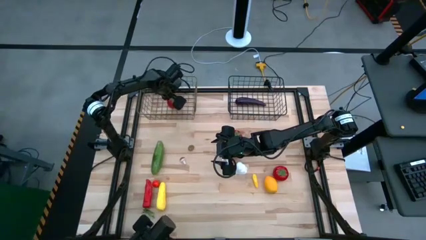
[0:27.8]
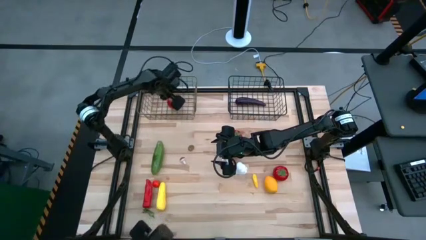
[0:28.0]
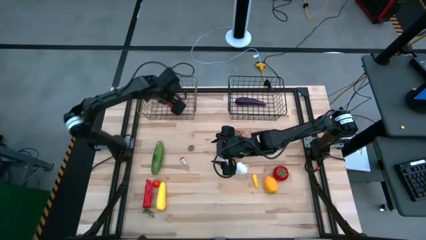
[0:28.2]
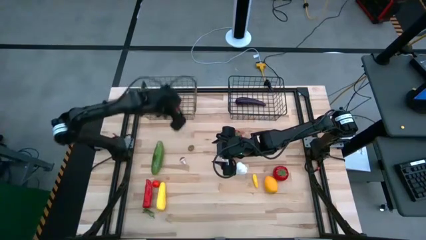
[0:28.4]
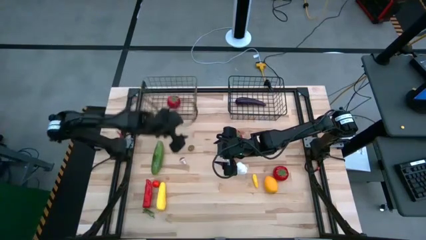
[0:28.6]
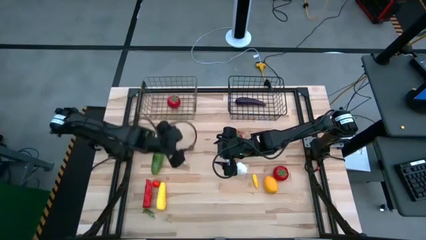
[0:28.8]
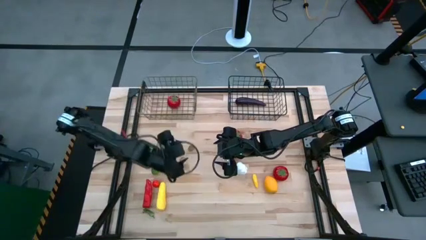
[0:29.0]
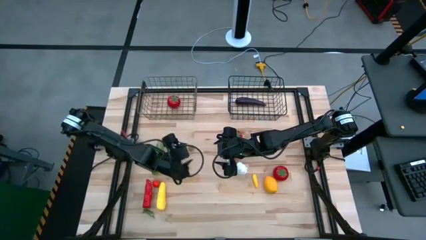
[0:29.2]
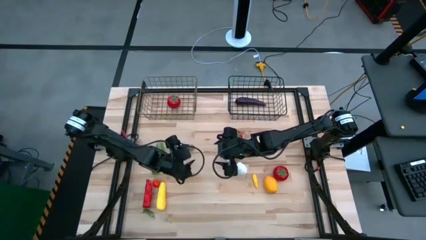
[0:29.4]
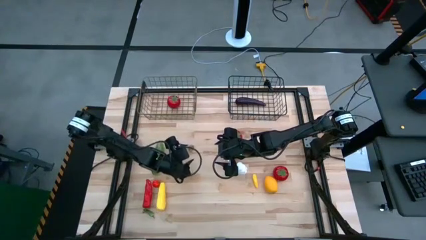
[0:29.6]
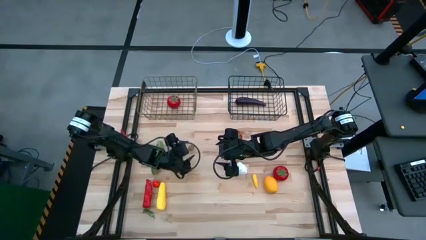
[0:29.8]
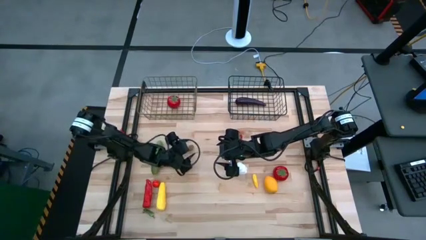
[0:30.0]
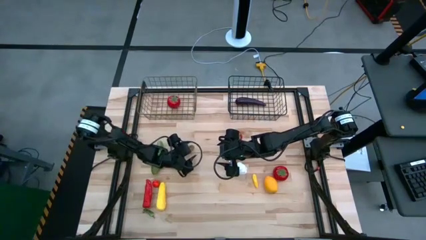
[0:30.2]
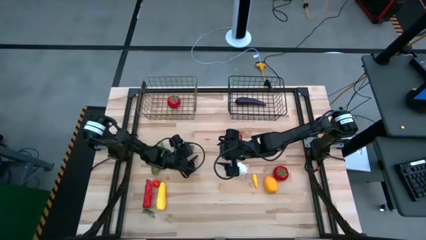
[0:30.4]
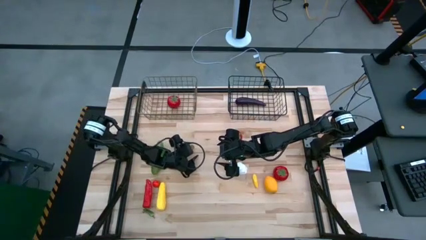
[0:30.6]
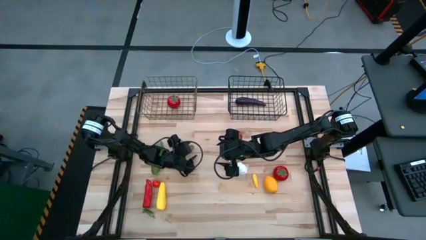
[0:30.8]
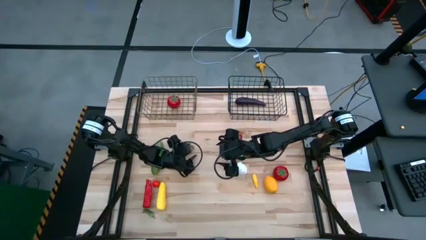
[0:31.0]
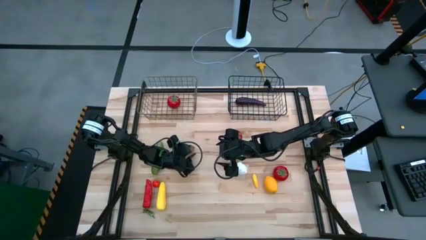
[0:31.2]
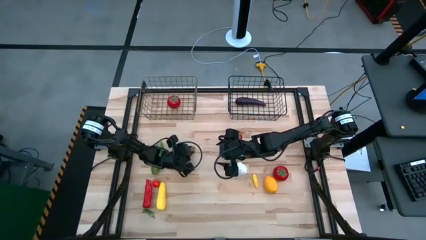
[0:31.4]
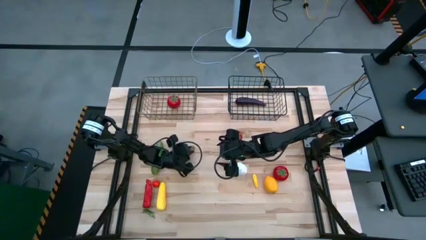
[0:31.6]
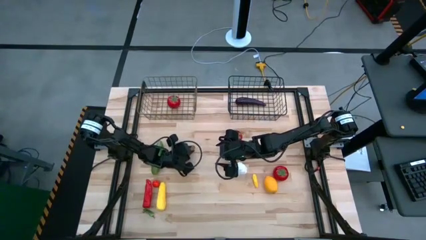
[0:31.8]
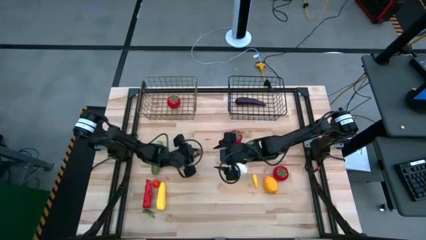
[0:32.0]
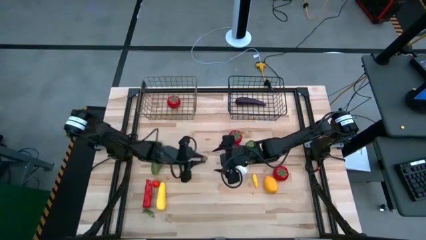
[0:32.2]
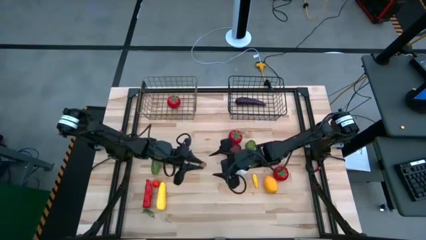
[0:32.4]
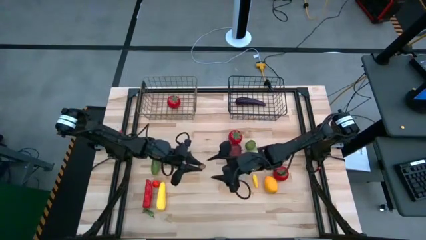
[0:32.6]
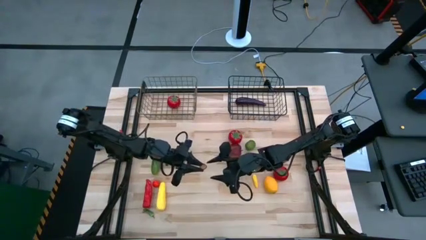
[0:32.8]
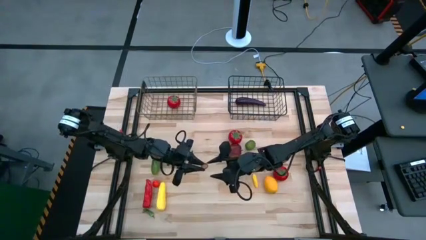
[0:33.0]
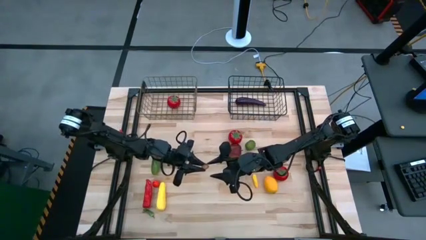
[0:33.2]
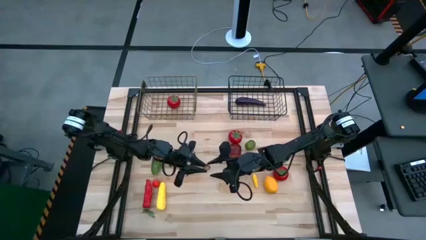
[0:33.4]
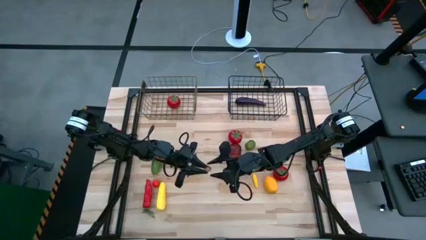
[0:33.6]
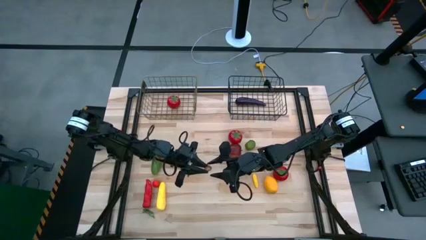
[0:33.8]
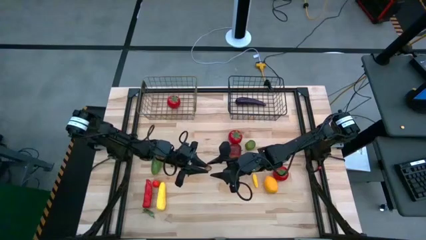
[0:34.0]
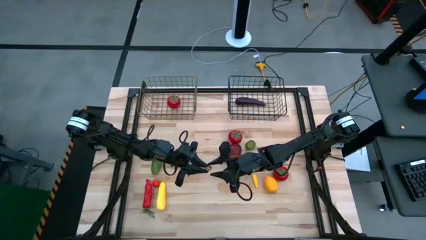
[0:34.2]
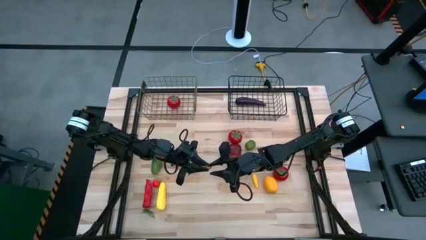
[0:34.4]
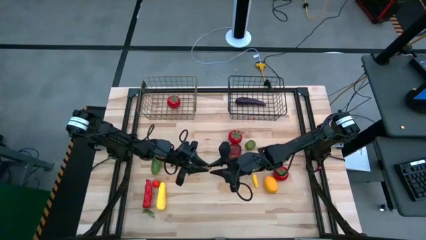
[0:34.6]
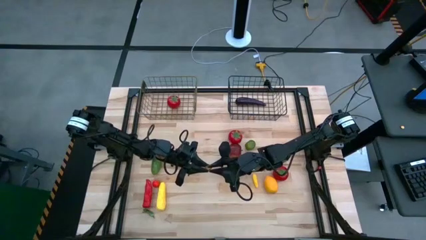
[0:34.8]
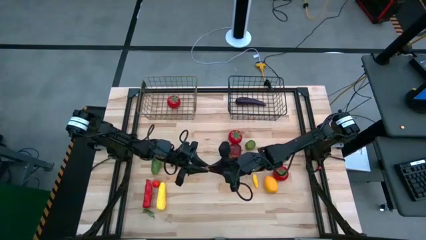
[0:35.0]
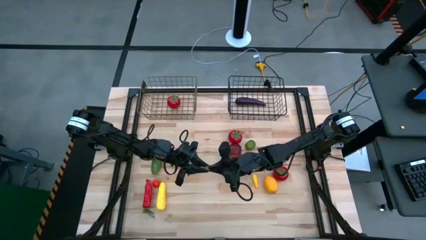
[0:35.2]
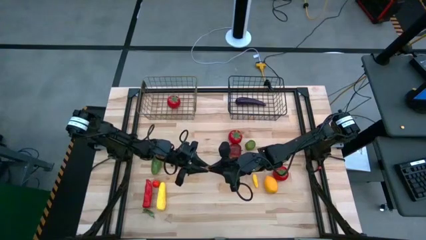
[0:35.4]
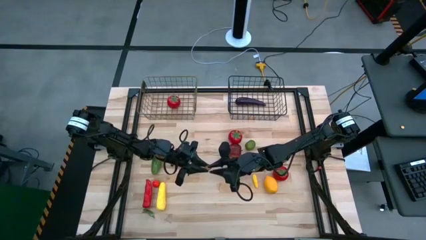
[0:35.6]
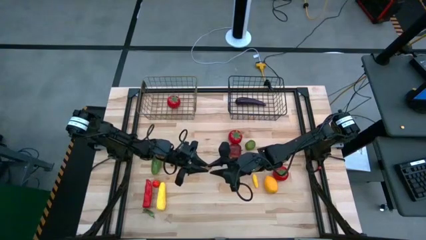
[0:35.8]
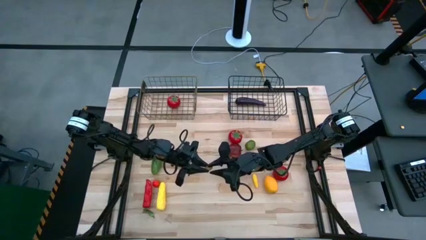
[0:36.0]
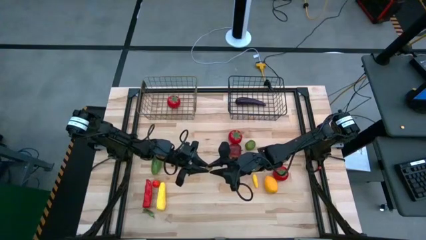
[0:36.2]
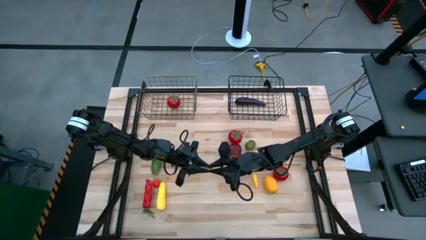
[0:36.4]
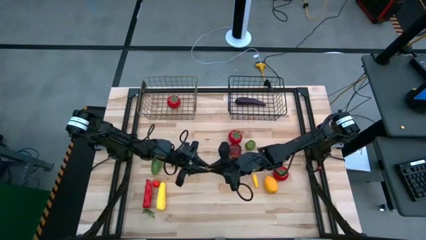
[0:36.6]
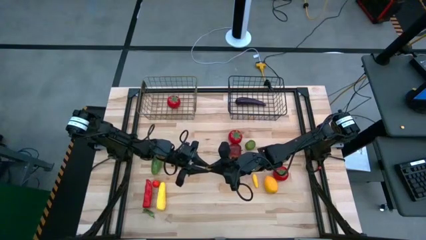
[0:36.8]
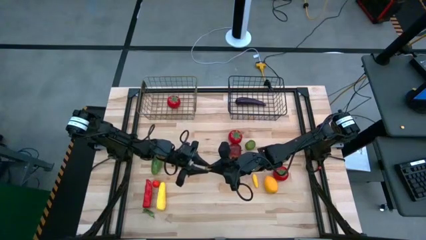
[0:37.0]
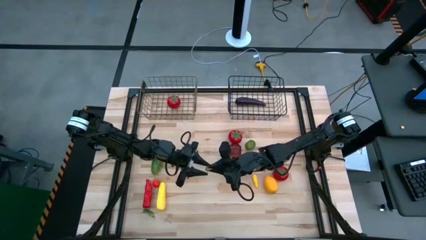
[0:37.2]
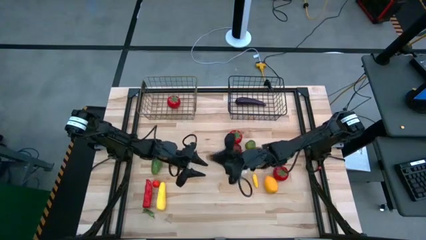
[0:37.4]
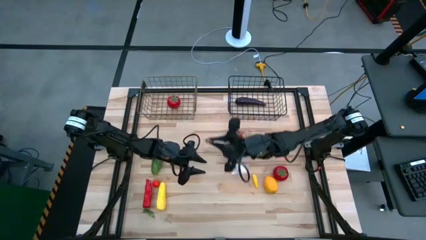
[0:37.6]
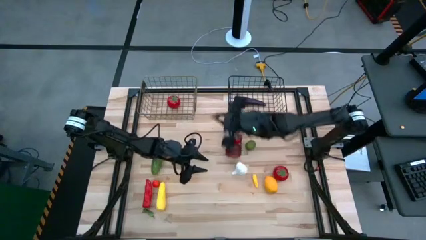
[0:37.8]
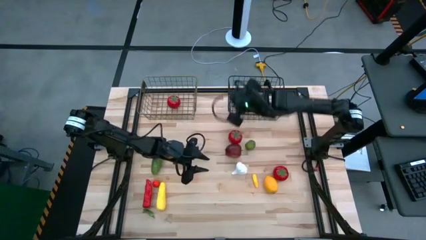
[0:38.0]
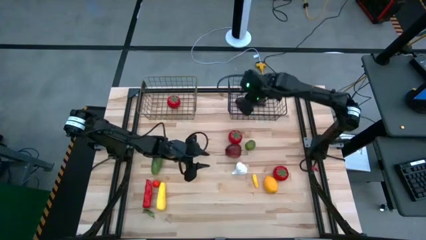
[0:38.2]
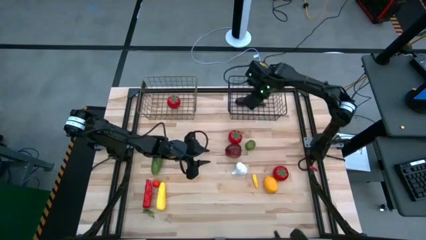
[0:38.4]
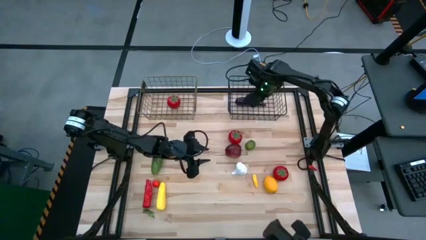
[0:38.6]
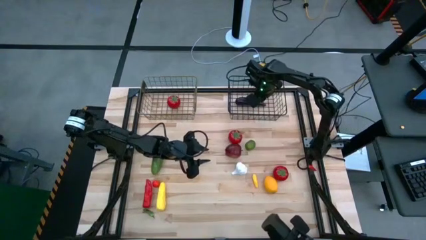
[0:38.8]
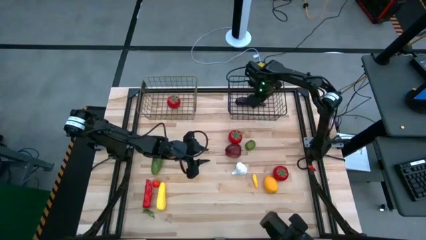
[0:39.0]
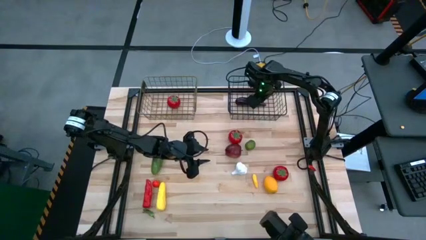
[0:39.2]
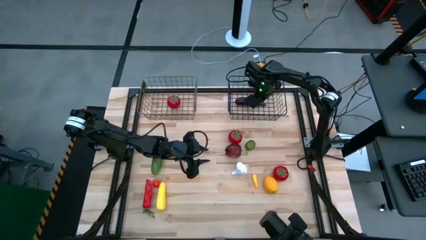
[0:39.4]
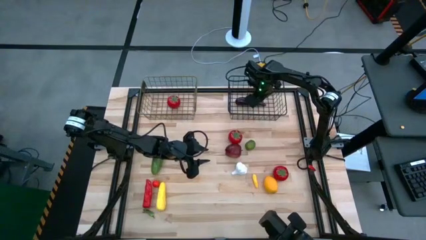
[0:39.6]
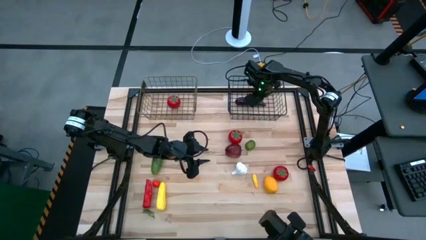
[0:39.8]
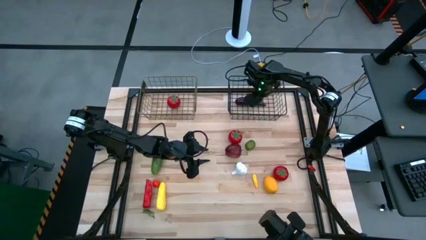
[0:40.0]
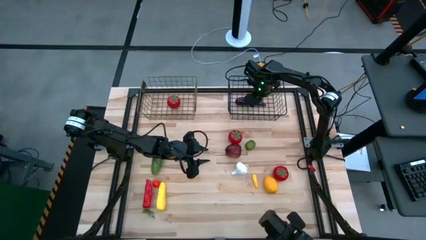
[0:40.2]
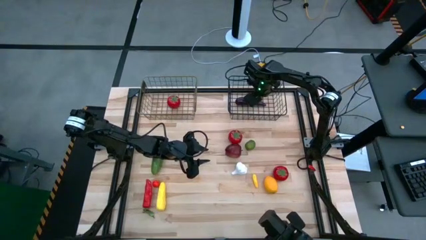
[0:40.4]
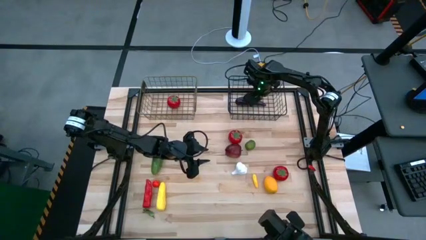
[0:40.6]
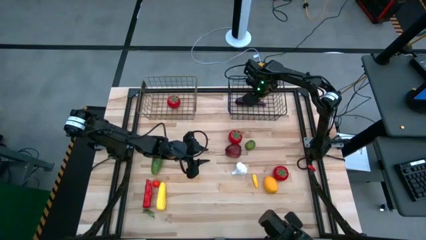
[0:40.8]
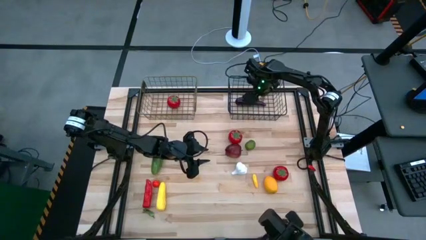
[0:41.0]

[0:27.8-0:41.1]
Task: Sort produce into baskets
Put the olive into the right wire basket
